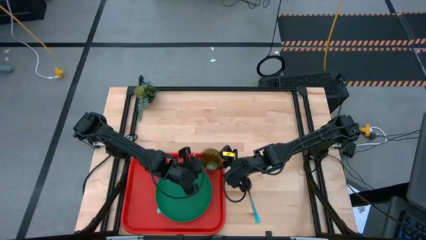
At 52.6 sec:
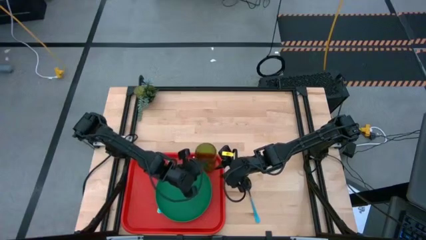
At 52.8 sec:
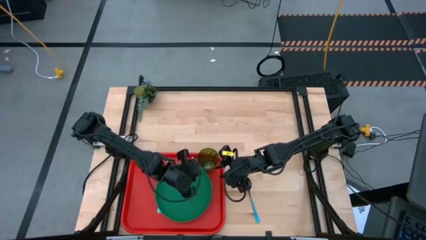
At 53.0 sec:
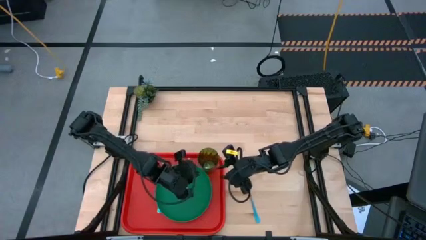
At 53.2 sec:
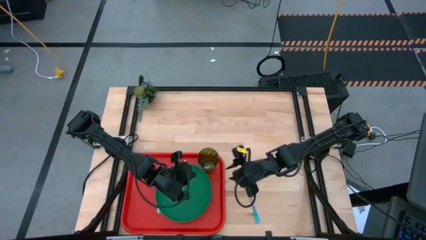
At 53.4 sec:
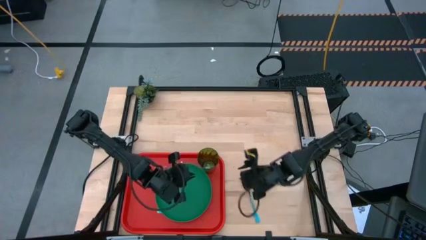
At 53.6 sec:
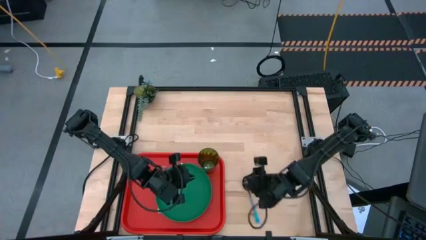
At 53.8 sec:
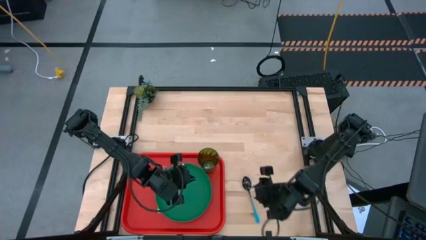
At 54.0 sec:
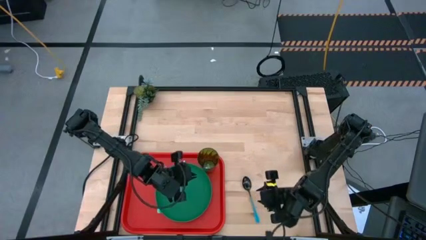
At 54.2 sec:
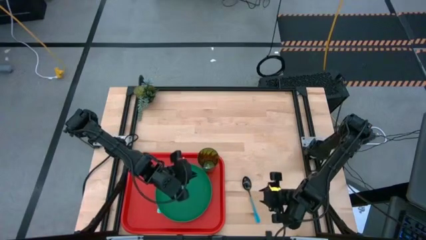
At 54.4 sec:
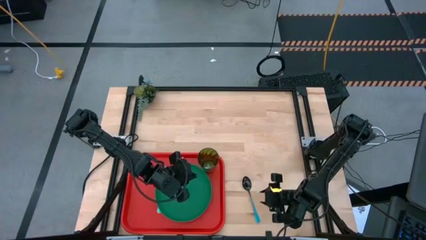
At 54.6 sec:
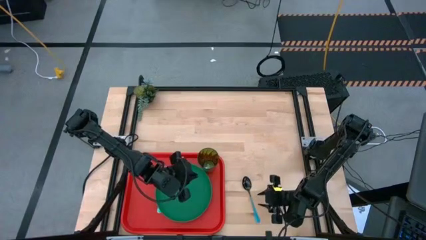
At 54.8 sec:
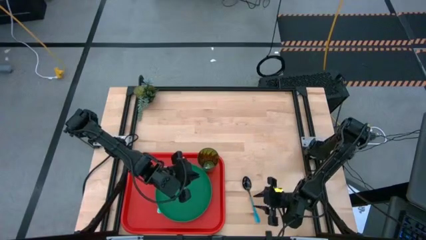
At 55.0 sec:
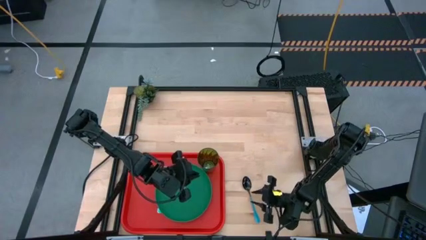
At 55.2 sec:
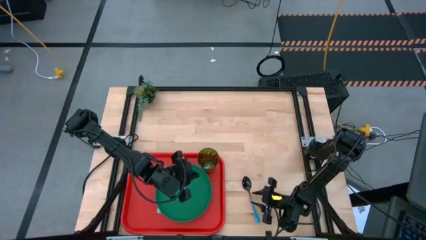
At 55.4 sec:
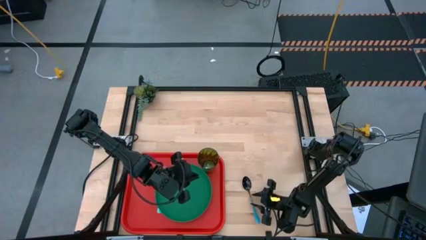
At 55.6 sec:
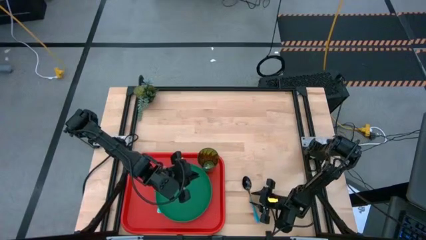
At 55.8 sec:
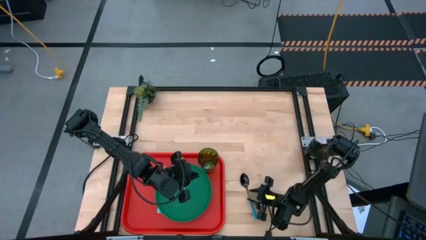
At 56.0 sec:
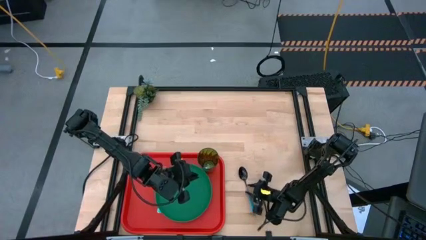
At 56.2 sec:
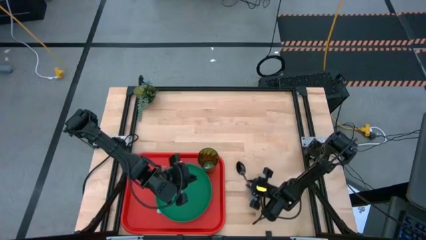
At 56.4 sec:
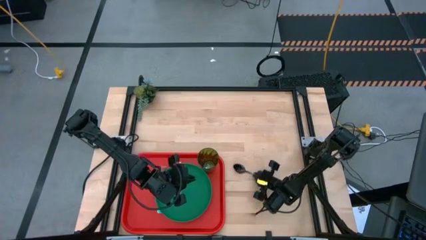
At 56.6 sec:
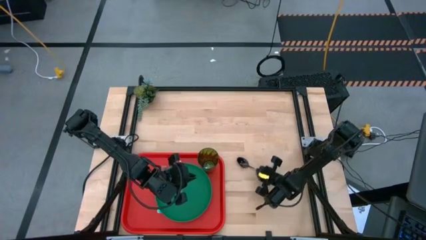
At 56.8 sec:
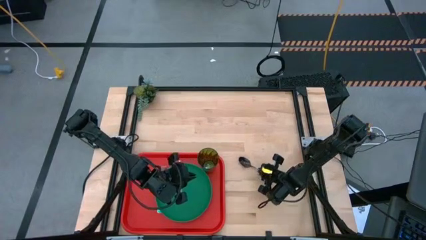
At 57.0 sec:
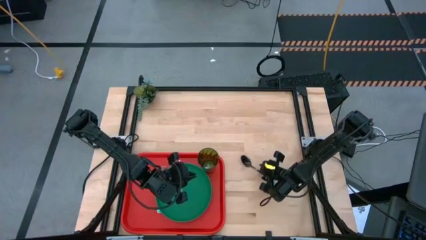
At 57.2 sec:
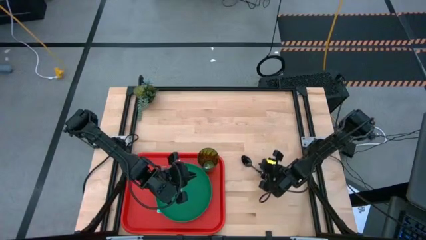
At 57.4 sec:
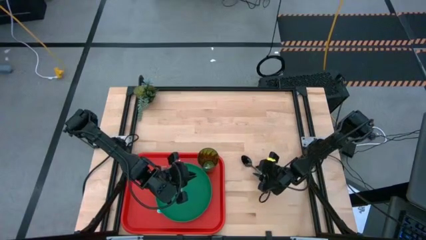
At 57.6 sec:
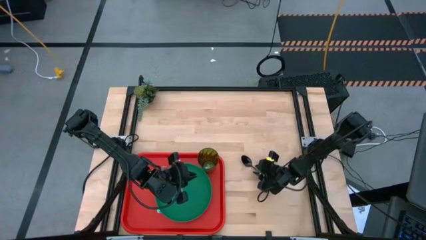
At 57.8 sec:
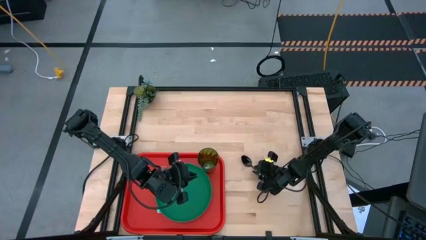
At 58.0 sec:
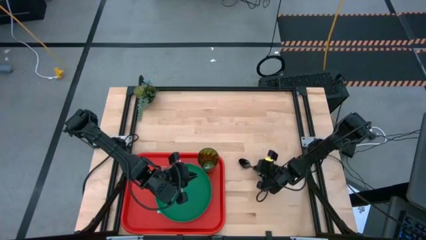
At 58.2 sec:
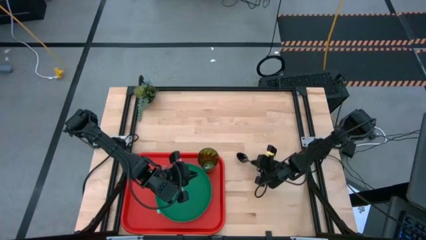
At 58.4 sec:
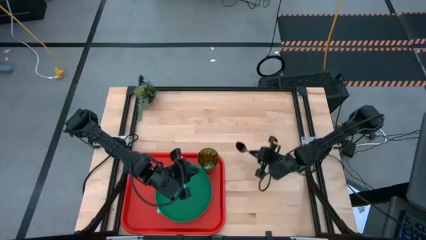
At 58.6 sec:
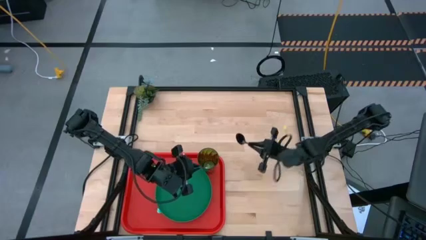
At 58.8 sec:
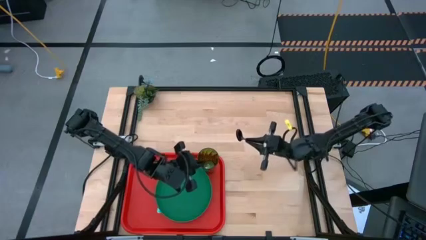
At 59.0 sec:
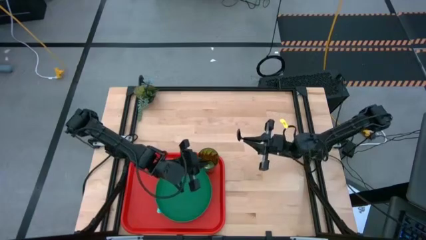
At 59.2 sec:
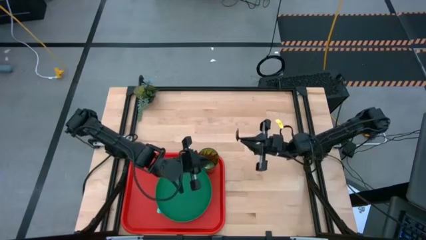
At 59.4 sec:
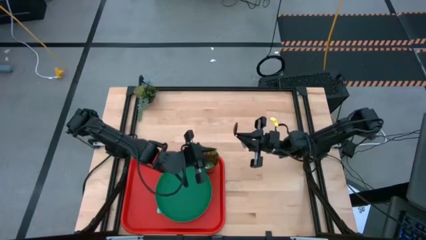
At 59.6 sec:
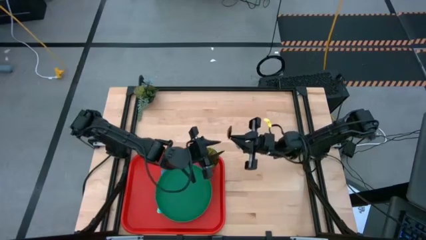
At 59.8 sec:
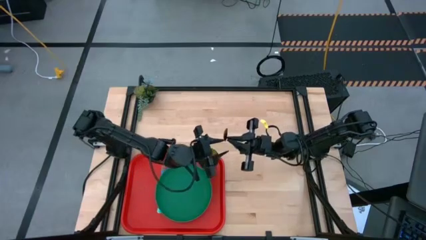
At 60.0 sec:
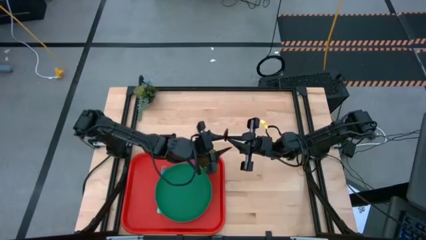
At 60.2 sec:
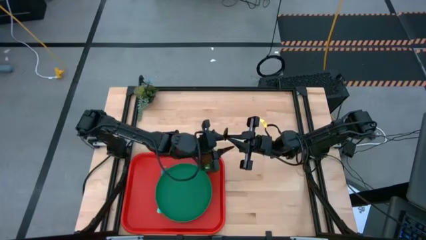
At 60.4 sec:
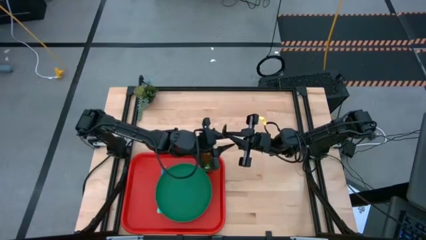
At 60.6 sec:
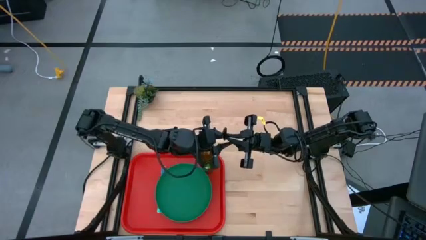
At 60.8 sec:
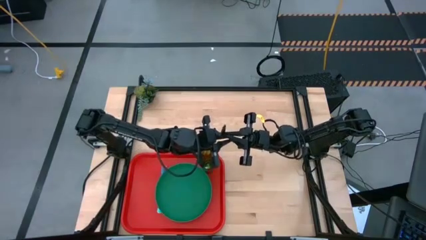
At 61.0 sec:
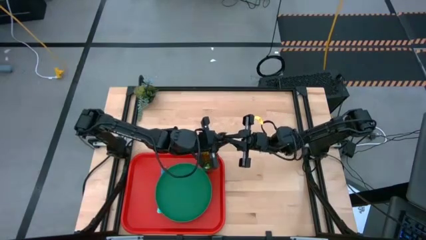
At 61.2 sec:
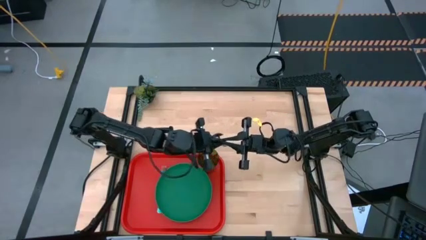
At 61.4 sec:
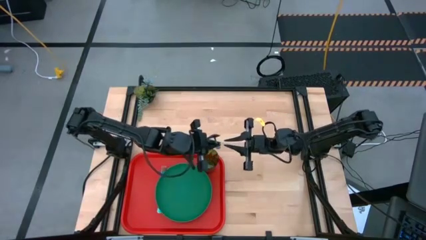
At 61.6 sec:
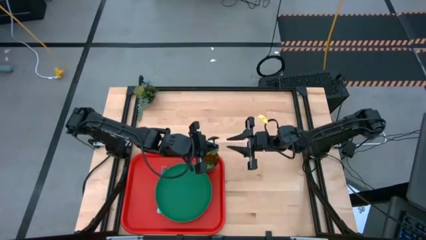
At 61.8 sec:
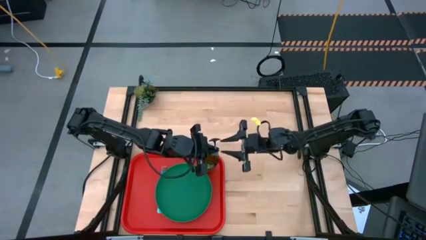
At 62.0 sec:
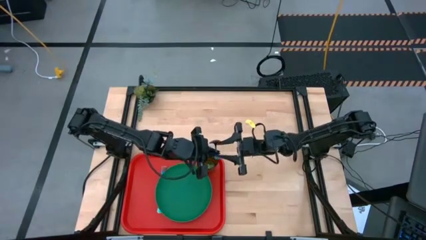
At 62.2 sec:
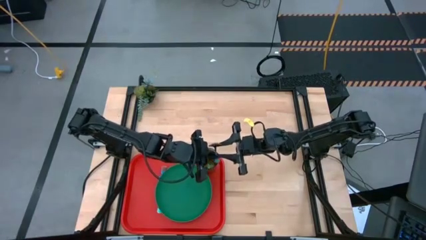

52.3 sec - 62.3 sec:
Task: Pick and place plate/cup/fork/spoon on tray
Put the blue spoon on the red tray to the left of the purple fork

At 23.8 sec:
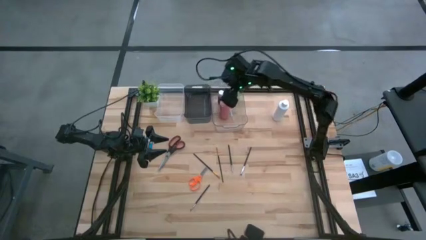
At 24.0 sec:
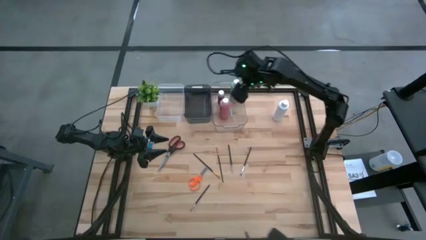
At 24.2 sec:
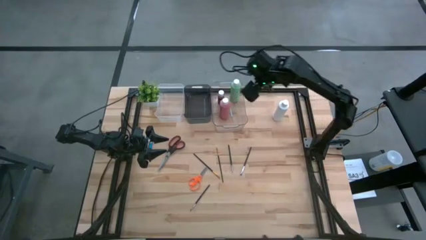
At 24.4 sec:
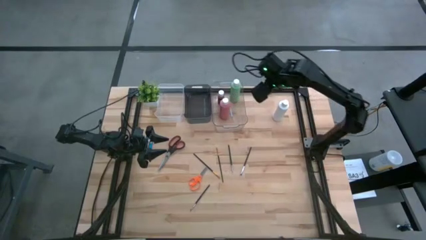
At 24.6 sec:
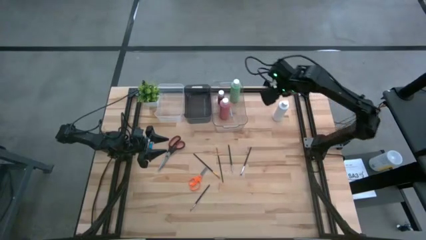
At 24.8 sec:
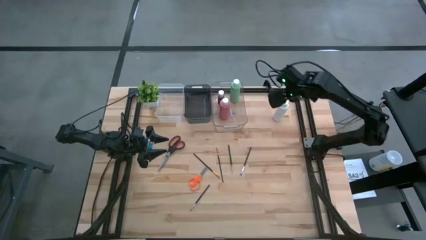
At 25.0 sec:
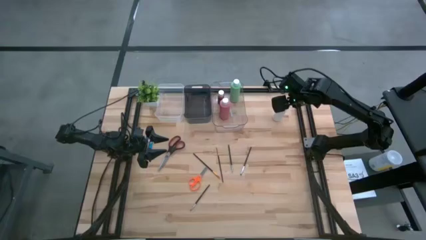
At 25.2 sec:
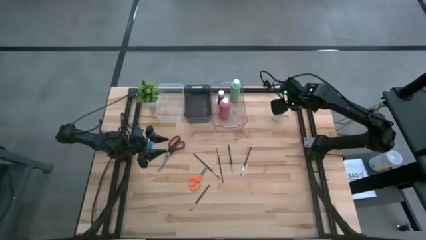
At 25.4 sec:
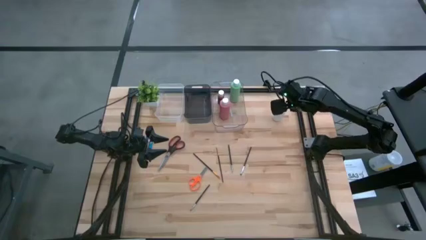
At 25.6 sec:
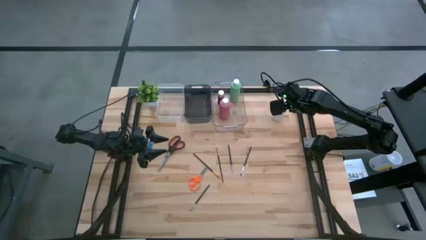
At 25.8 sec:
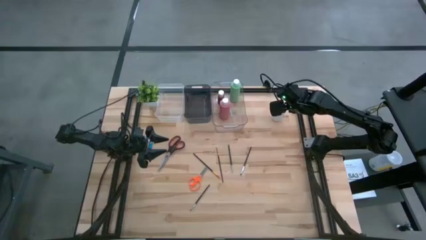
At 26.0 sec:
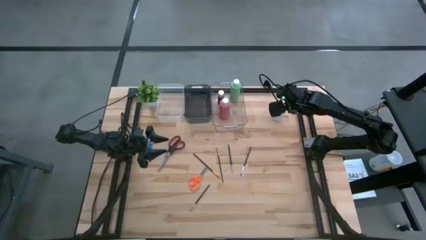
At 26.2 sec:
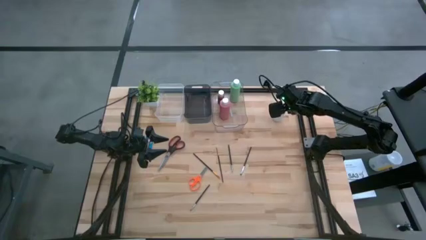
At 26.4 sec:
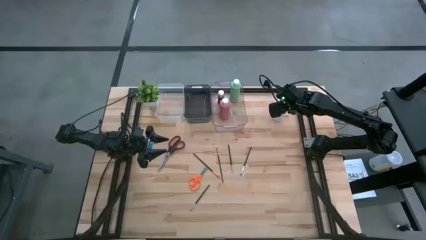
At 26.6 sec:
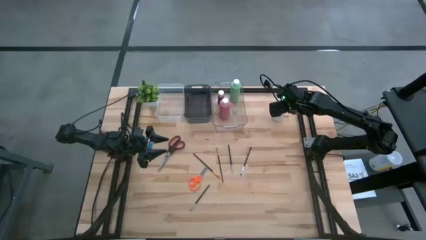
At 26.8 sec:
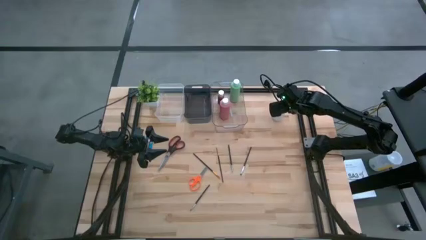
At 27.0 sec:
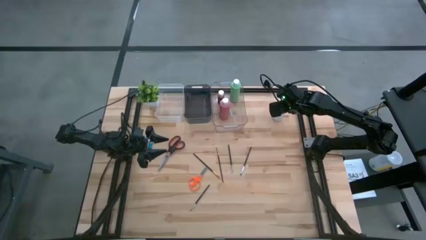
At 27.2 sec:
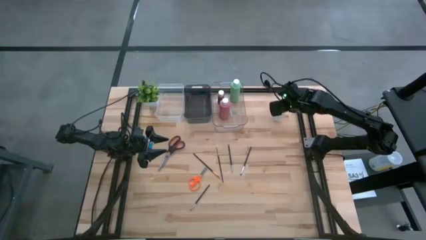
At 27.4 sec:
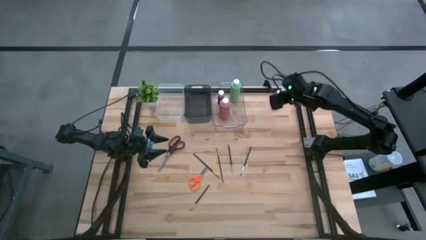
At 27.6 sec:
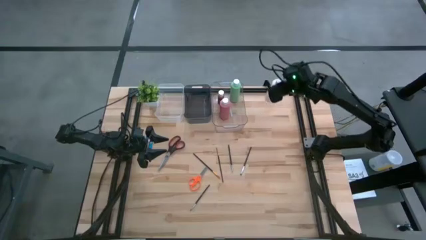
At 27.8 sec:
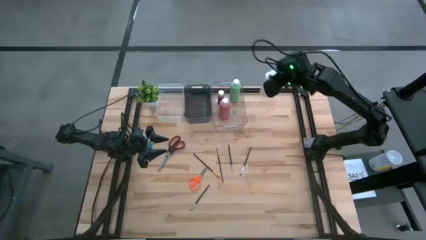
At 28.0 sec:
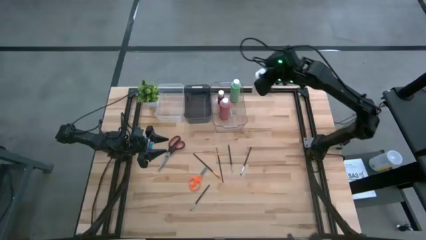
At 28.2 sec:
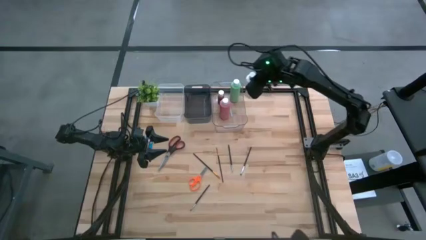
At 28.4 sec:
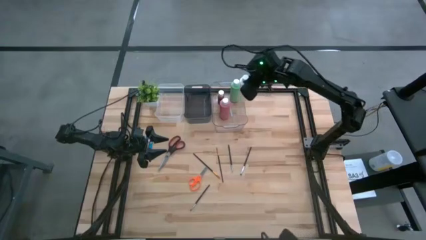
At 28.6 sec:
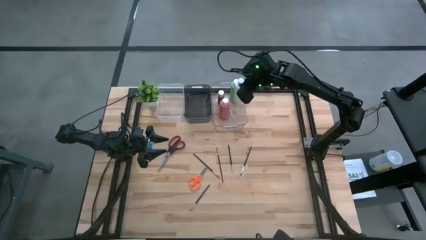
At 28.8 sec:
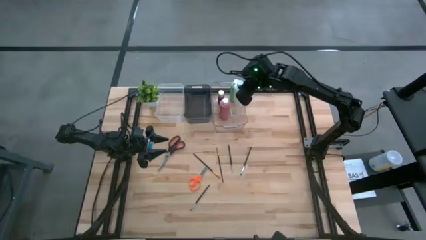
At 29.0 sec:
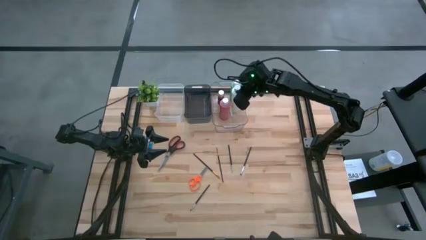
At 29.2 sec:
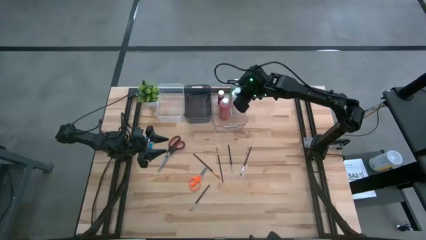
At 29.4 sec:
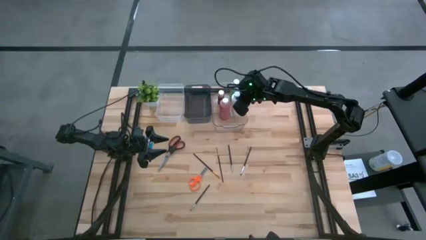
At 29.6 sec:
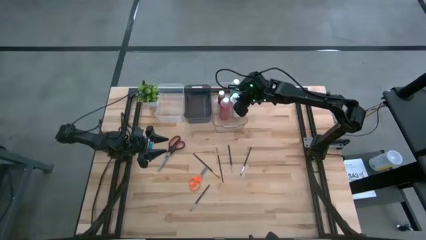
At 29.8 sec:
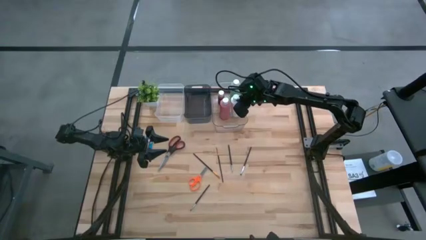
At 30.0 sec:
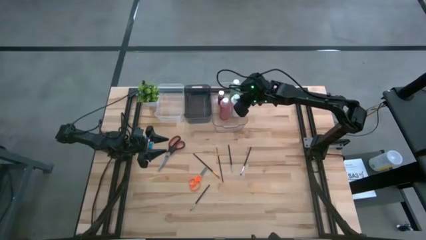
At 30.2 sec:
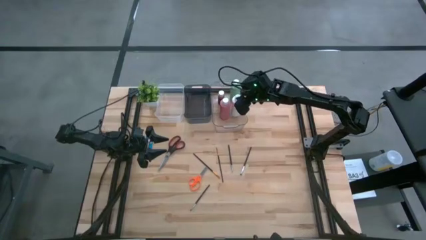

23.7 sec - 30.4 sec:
Task: Pick & Place Paint Supplies
Put the white paint bottle into the right transparent bin
